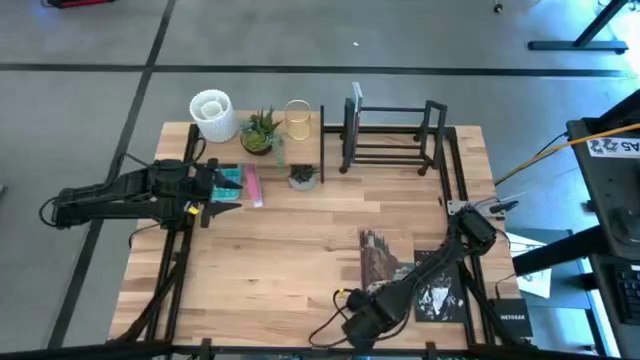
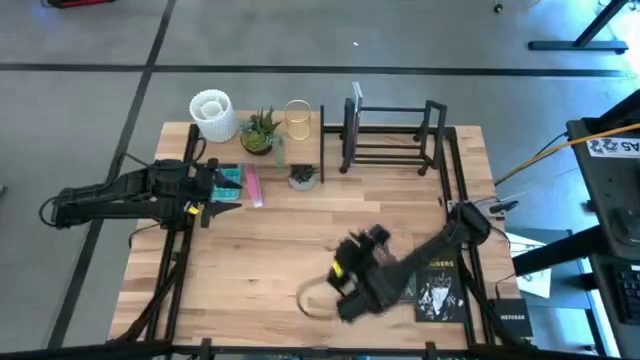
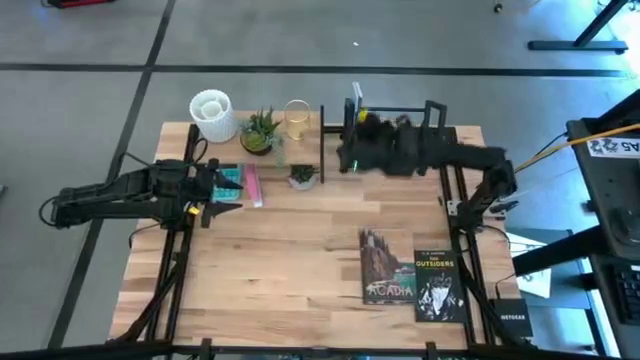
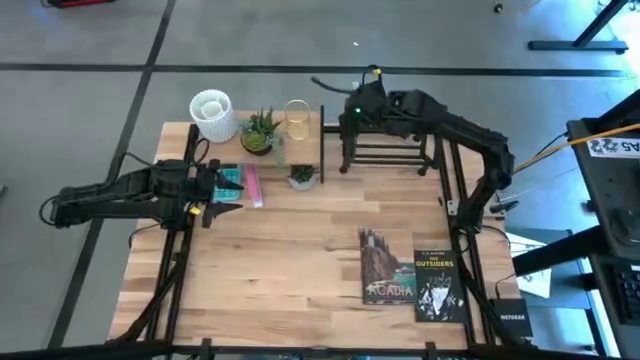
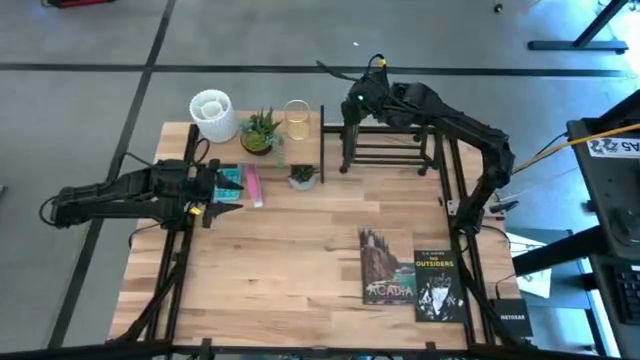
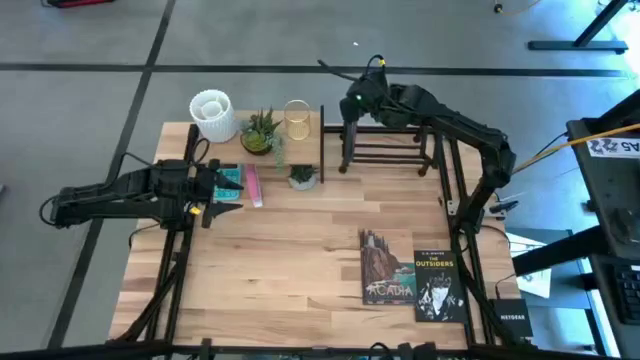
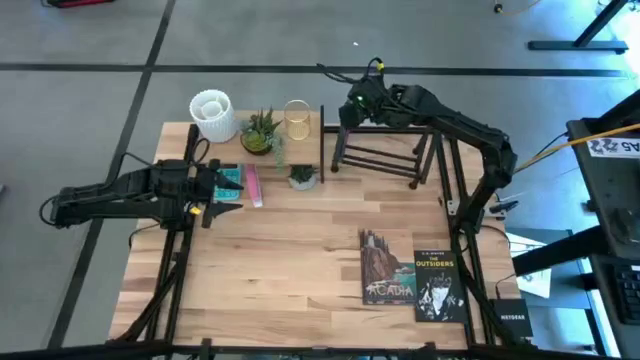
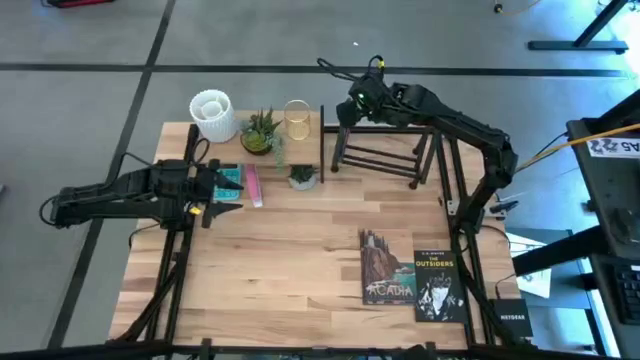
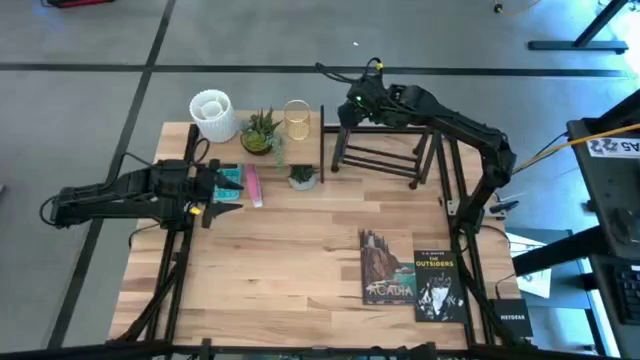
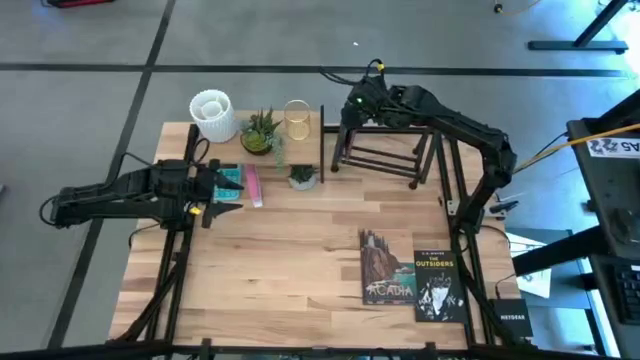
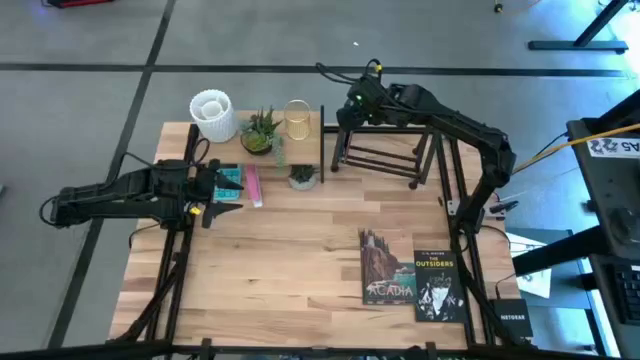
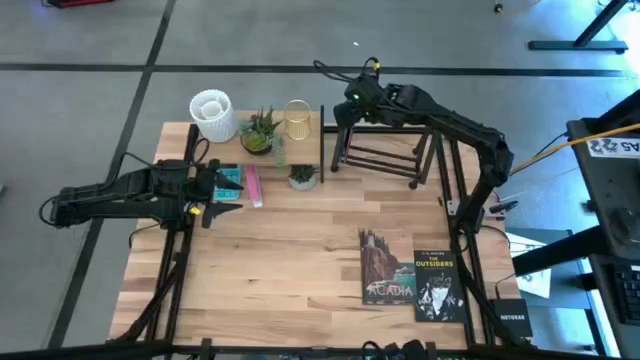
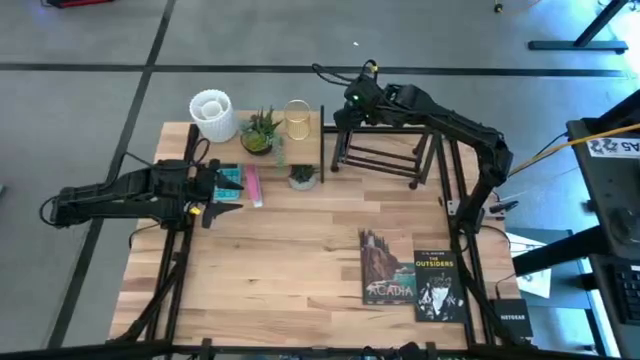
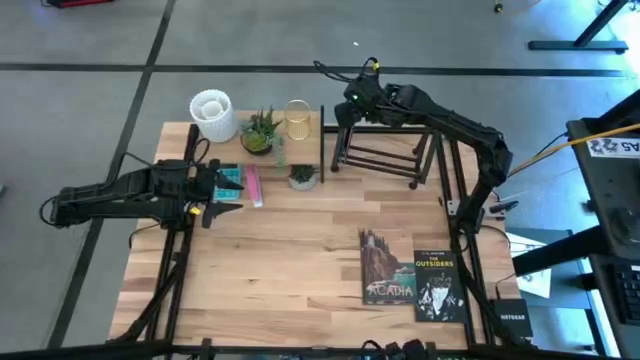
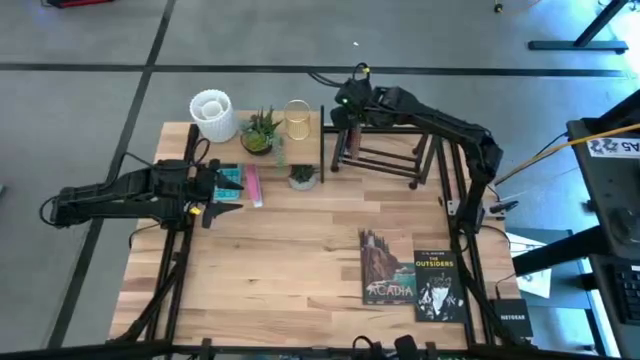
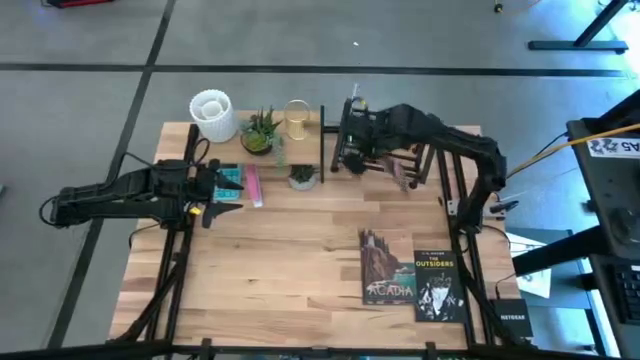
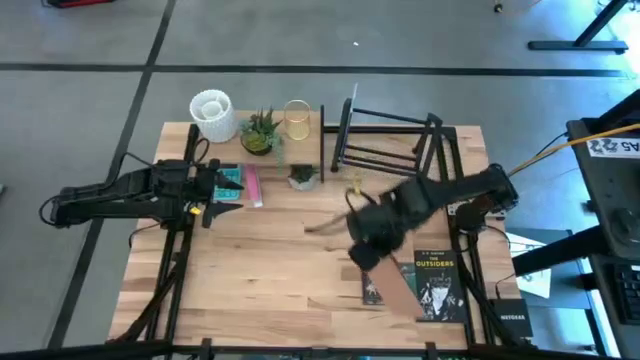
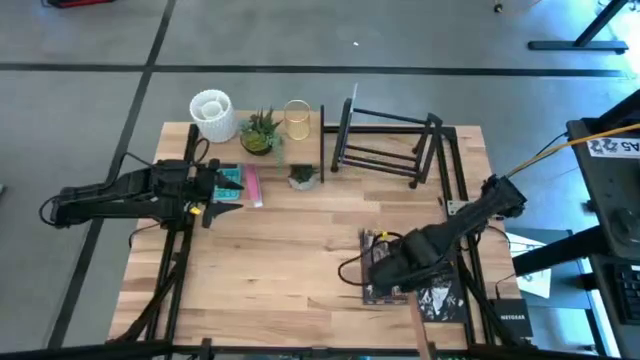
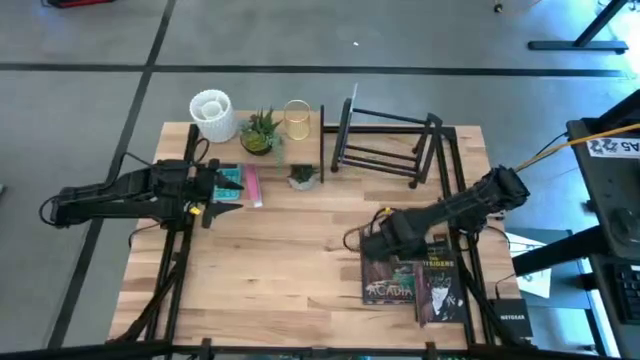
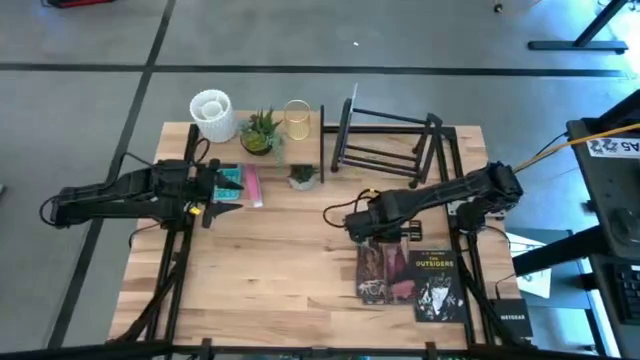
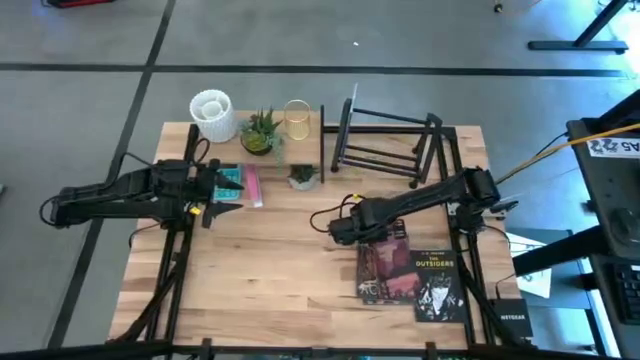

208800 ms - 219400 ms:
Task: Stock shelves
Remove the purple book from the bookshelf

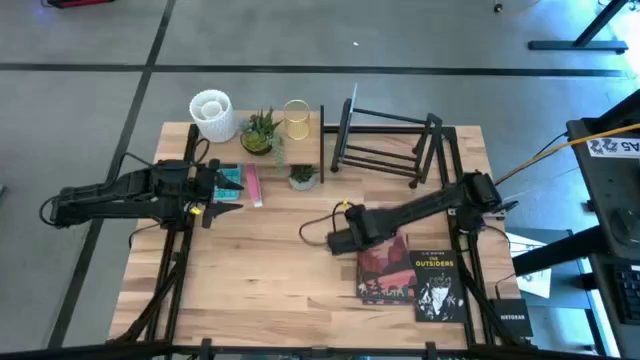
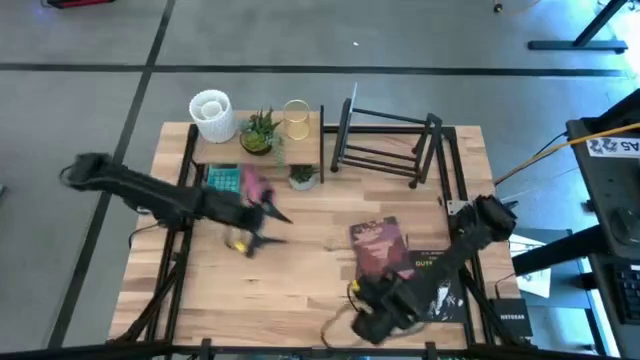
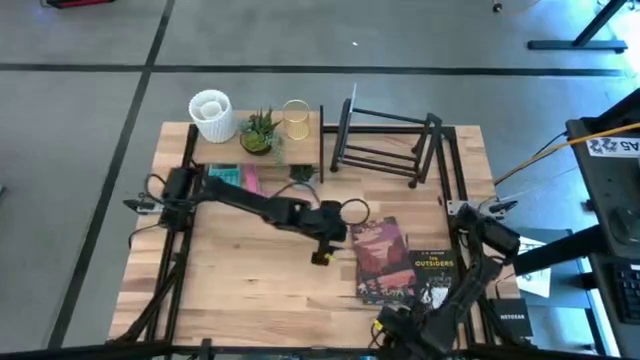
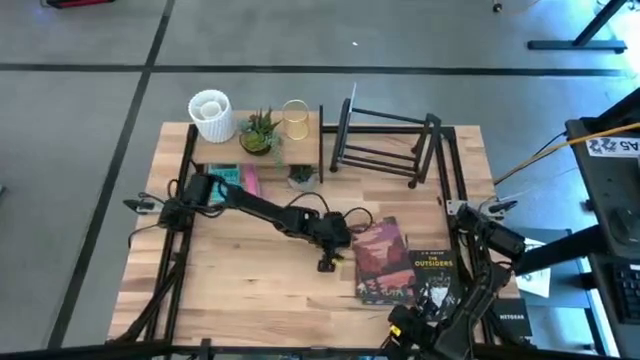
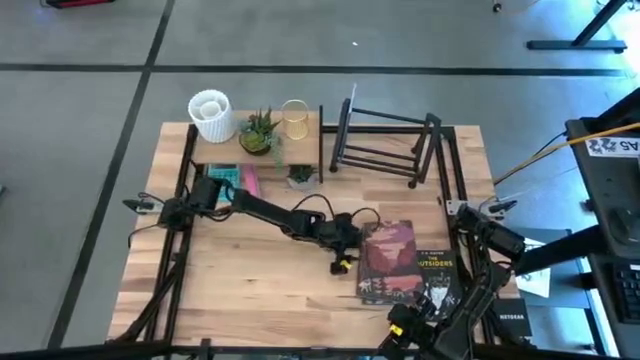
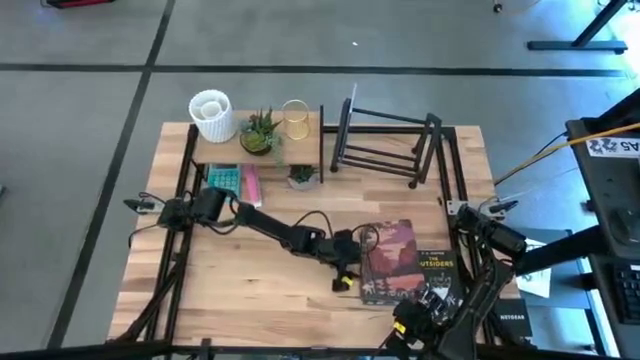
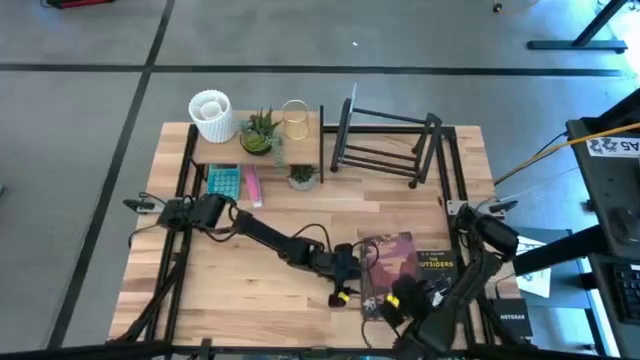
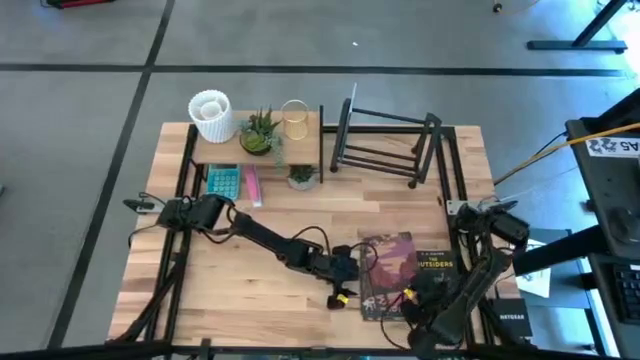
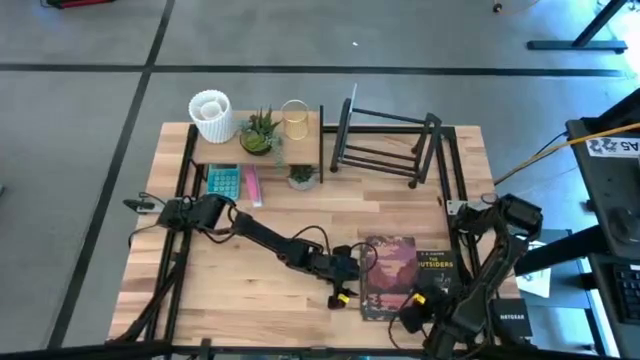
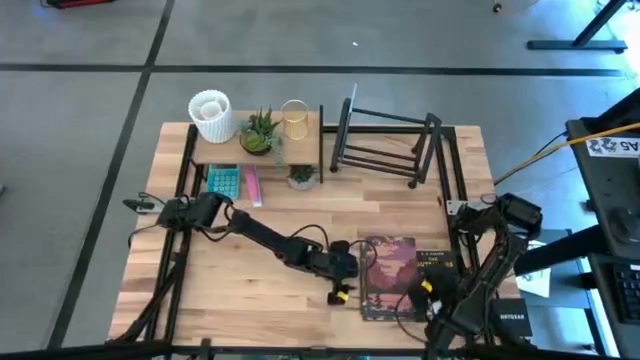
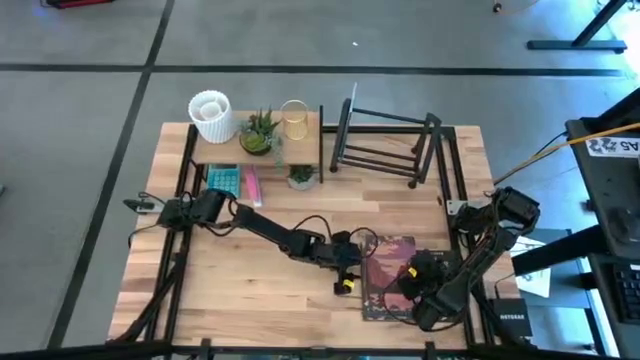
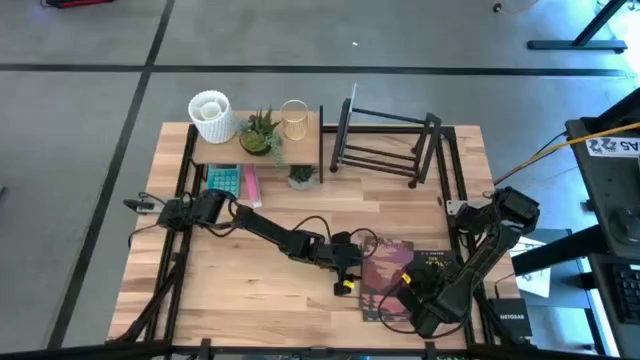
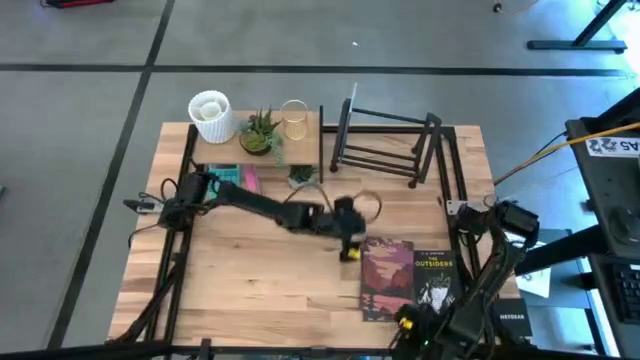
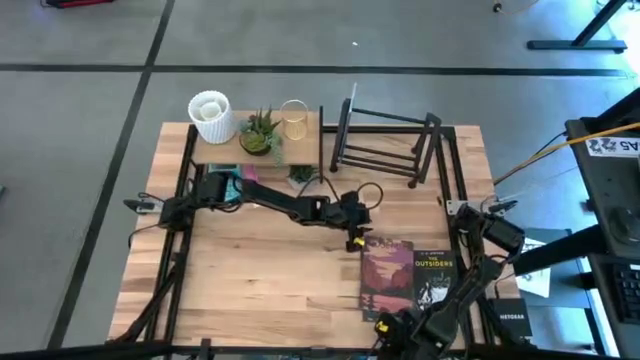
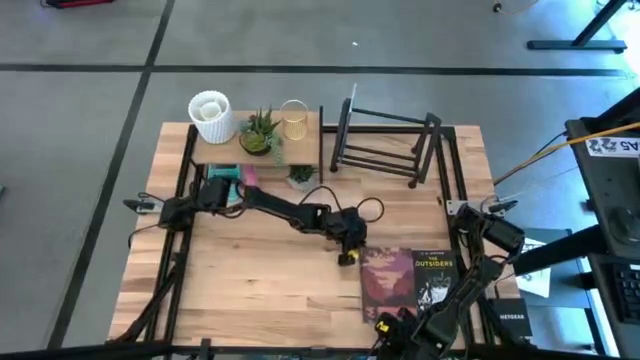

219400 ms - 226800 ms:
Adjust the stacked books on the table

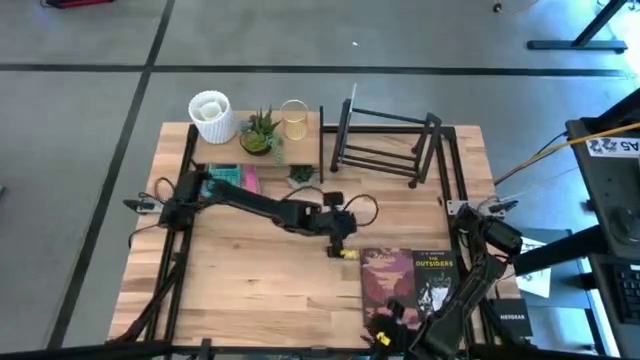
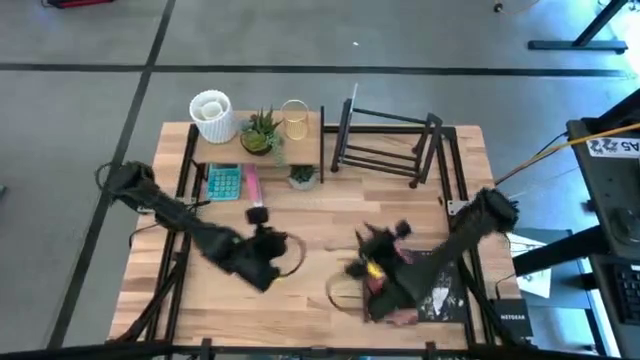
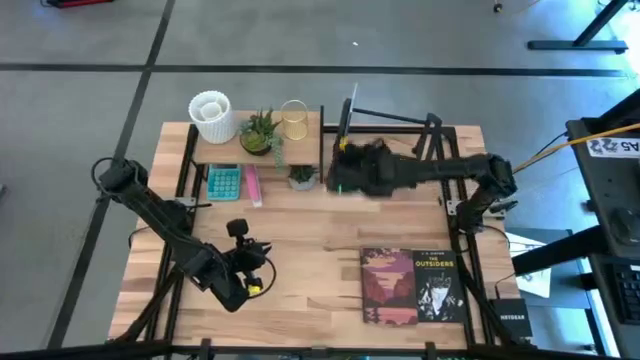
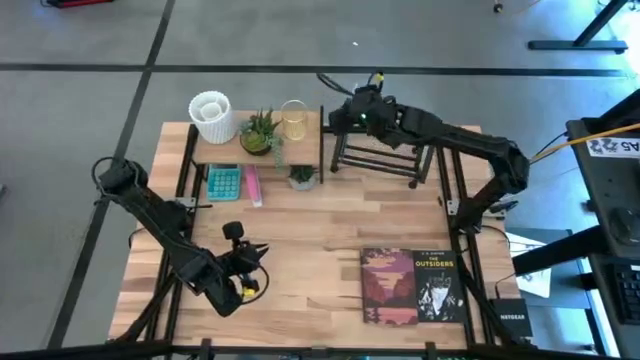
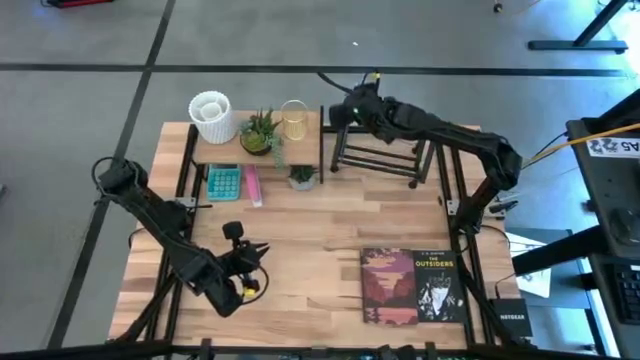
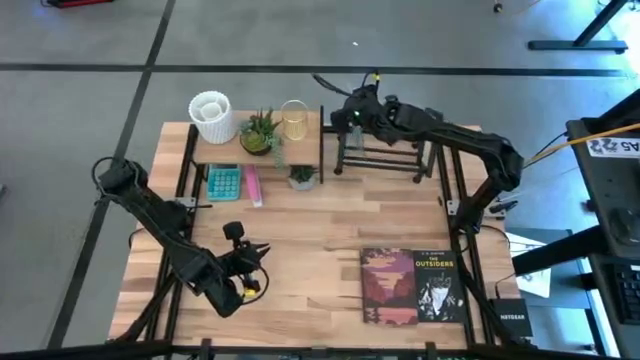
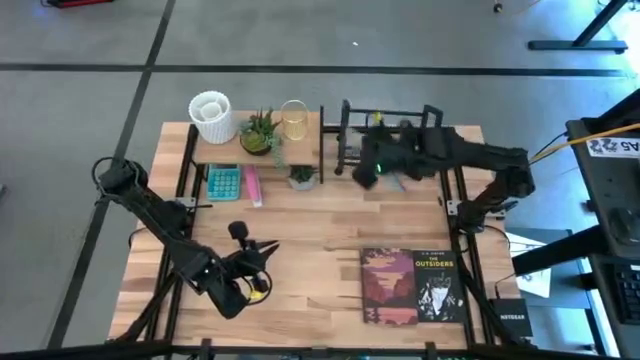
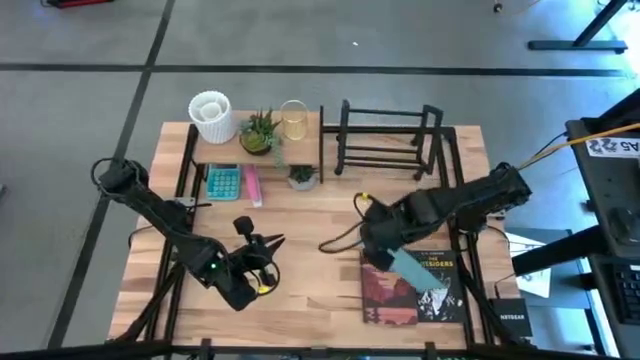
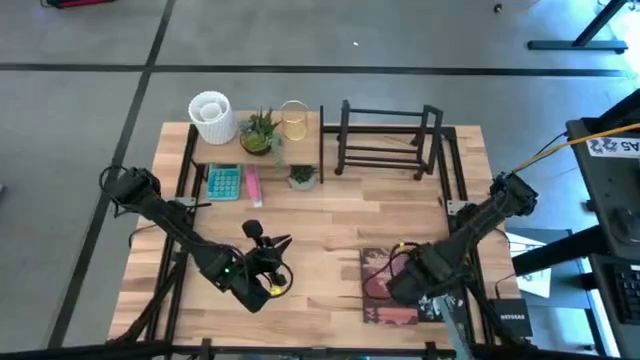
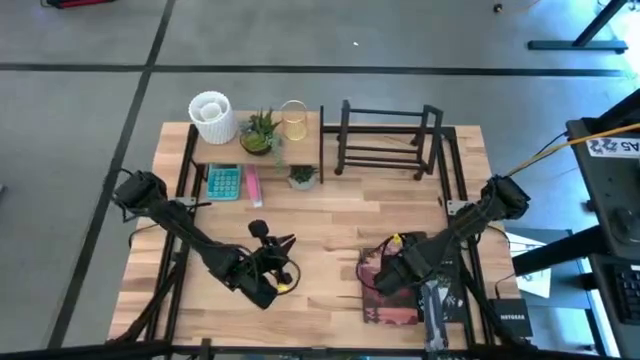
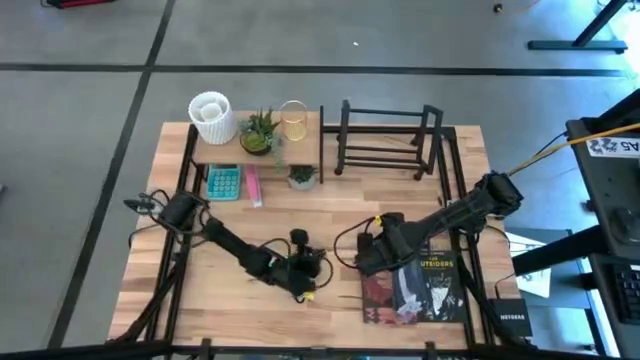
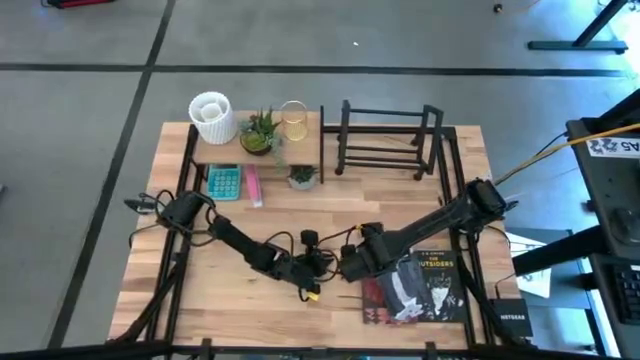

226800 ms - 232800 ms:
Remove the blue book from the bookshelf
